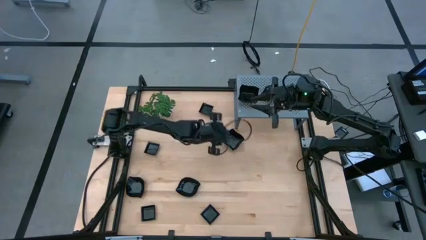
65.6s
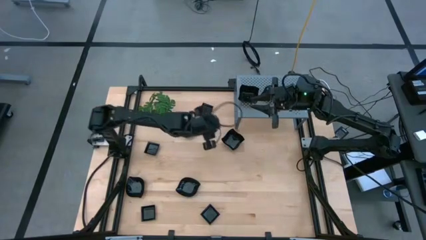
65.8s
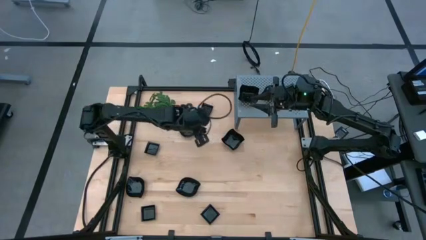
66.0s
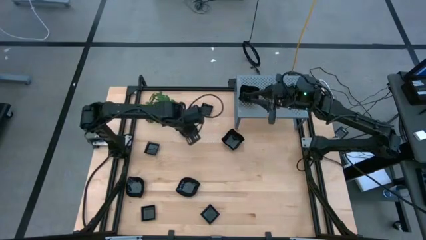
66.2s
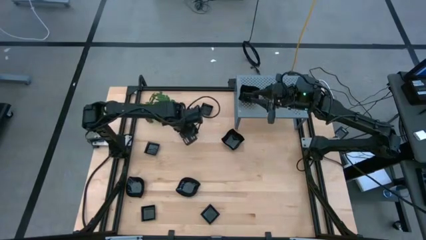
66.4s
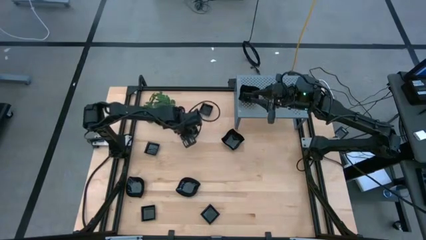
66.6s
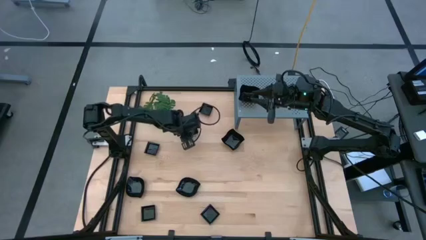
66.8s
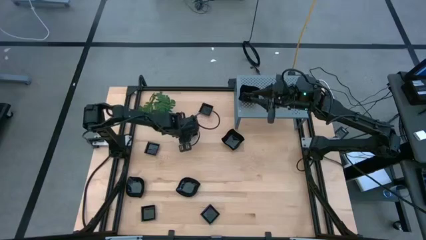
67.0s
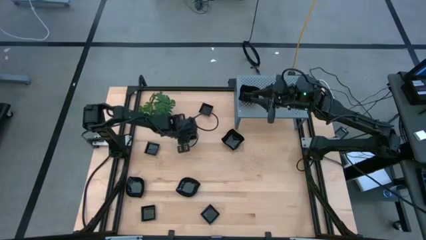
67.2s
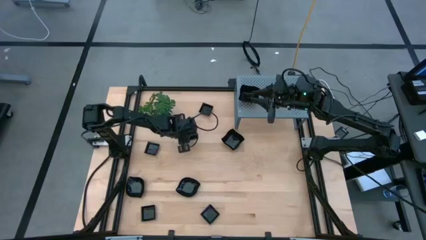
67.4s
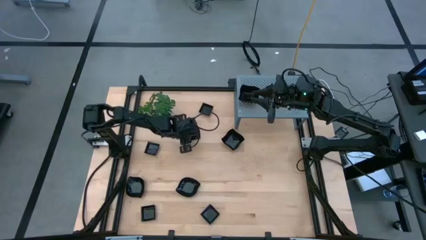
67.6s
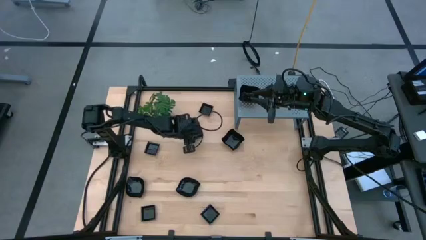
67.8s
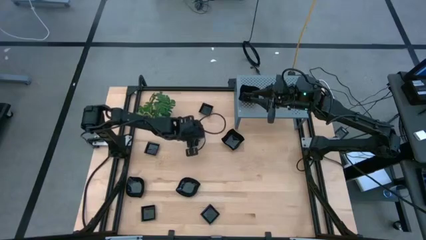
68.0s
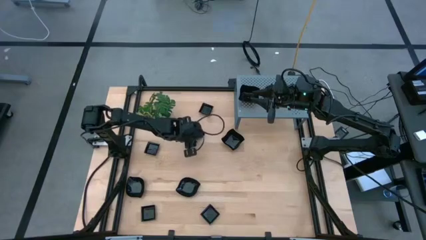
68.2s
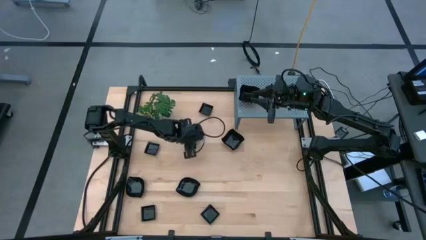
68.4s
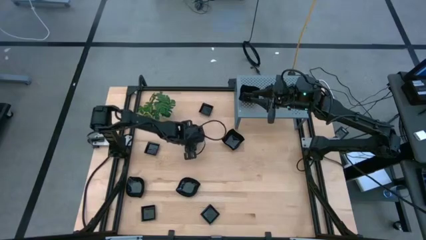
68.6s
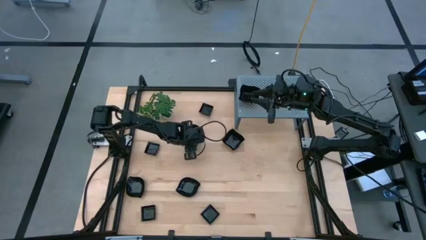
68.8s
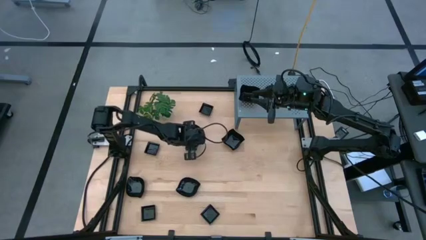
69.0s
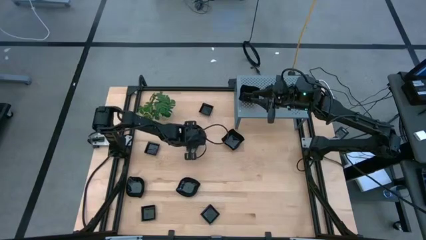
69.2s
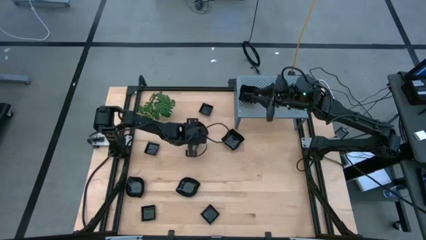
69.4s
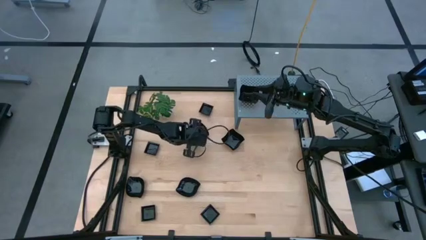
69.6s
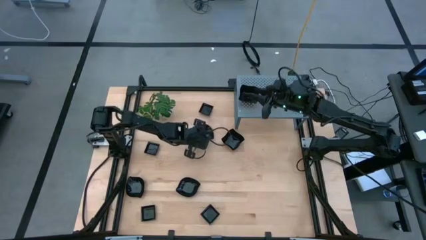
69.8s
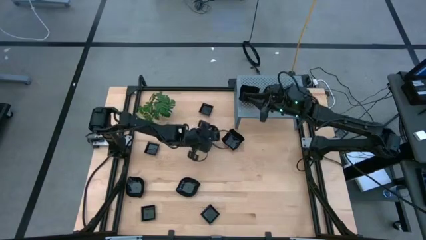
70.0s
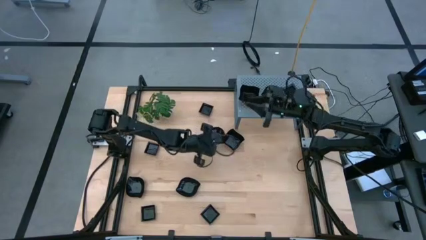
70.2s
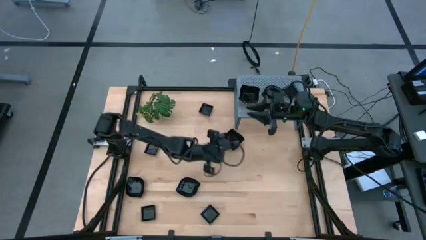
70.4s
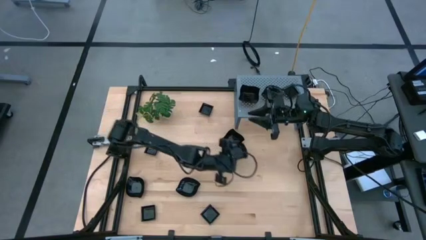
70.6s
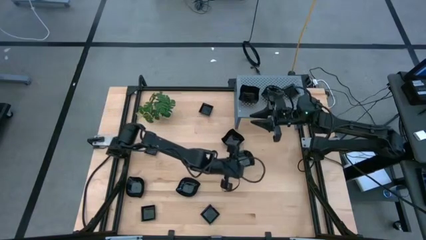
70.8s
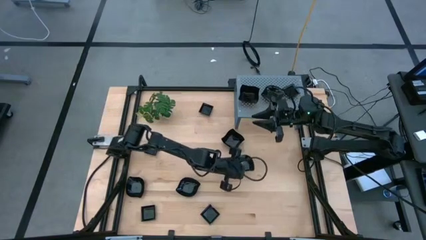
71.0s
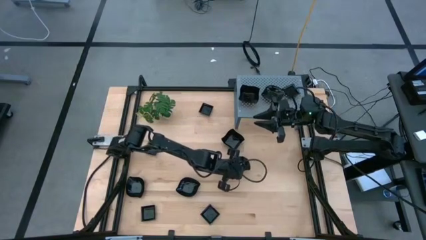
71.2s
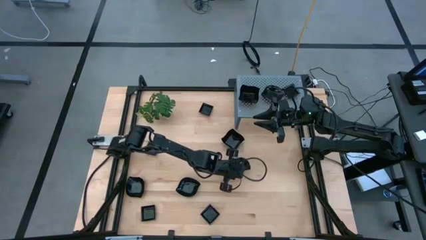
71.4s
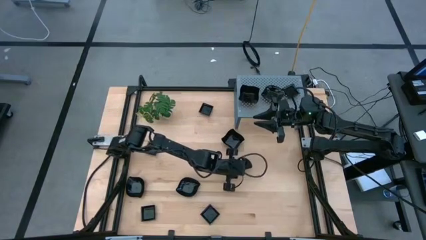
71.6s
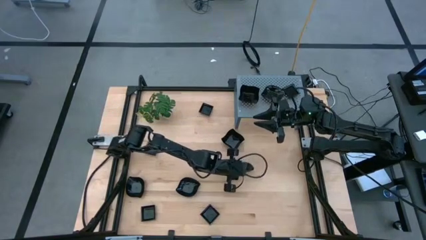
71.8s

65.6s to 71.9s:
Task: Pick & Place Mini shaped plates
Move the leaf shaped plate to the center of the table

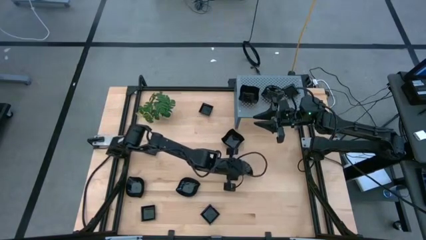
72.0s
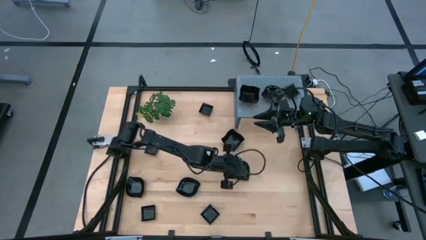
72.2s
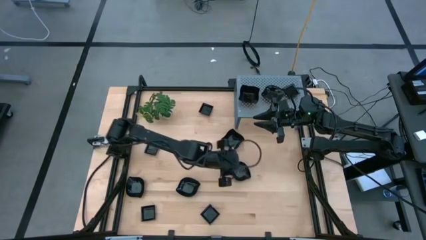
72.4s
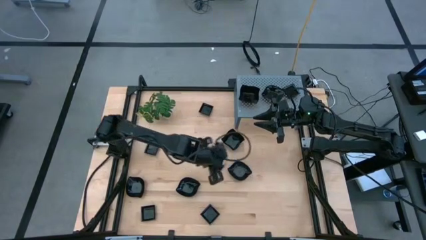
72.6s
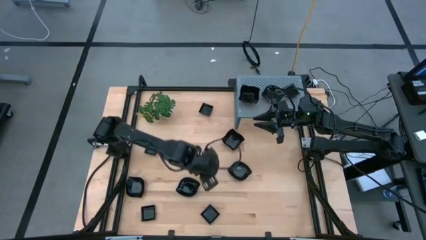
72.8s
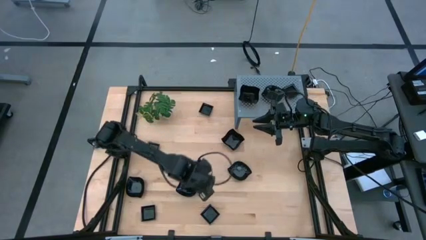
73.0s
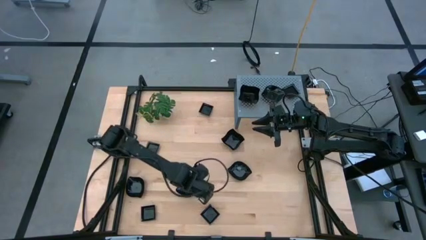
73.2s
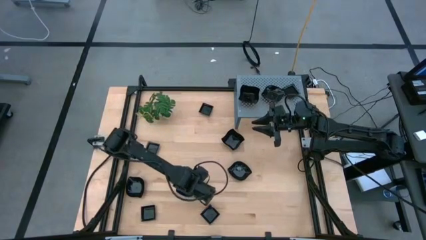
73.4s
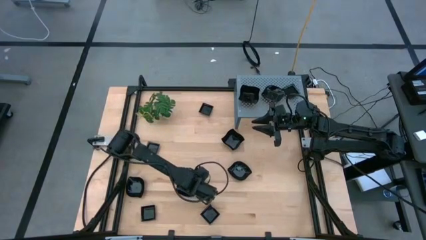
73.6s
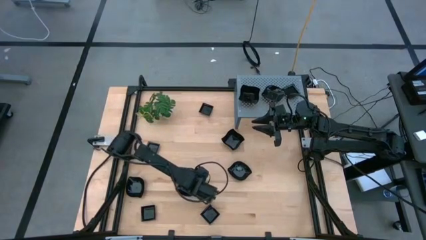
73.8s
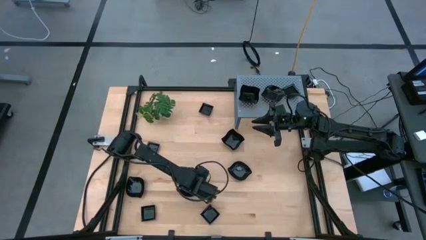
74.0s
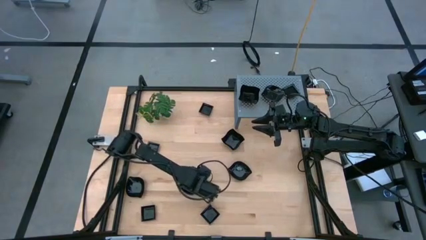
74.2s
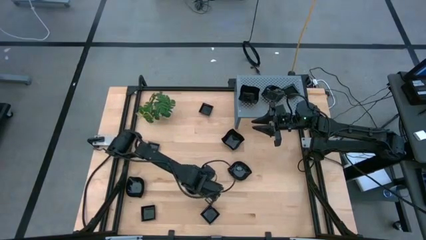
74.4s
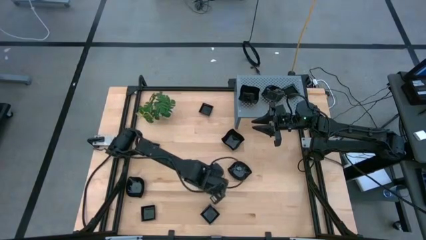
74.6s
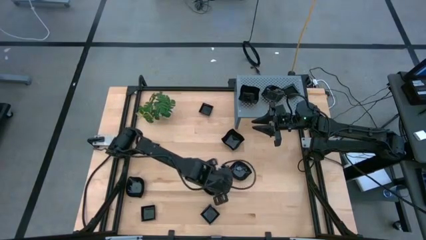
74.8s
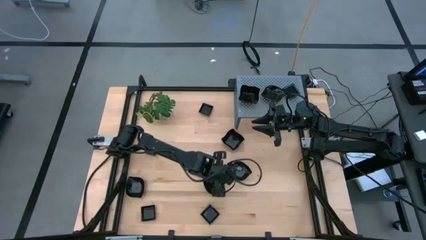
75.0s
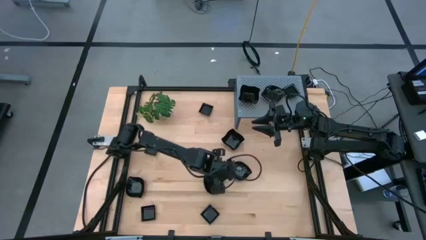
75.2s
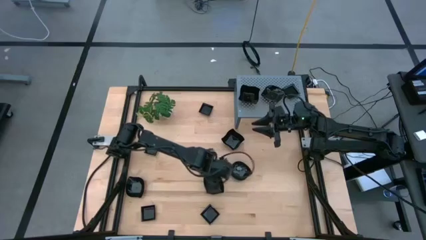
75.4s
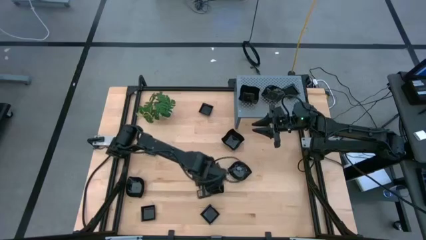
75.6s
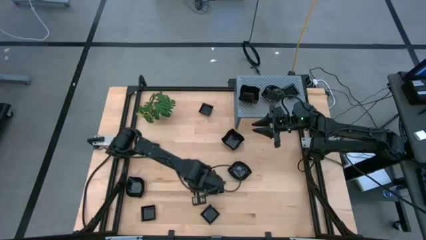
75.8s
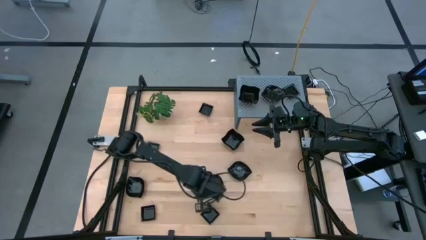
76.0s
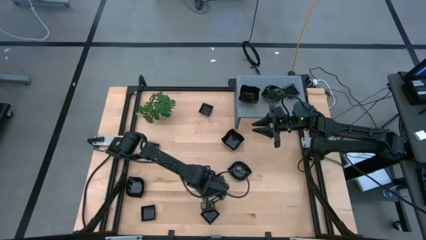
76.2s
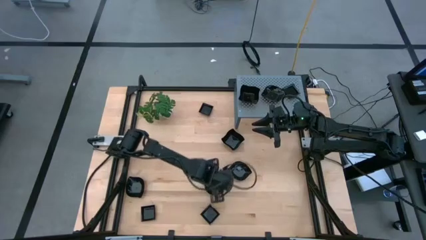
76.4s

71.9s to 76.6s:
Move the leaf shaped plate to center of the table

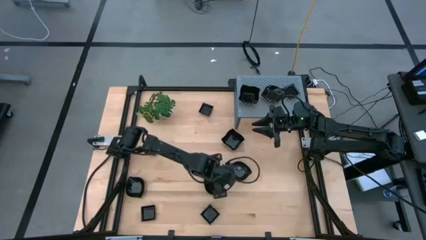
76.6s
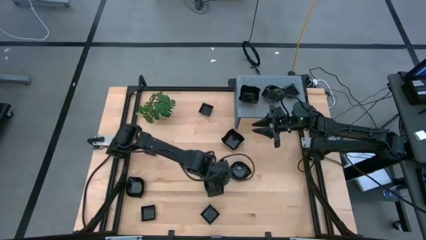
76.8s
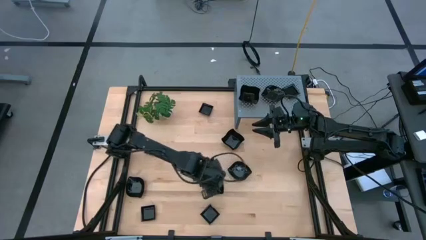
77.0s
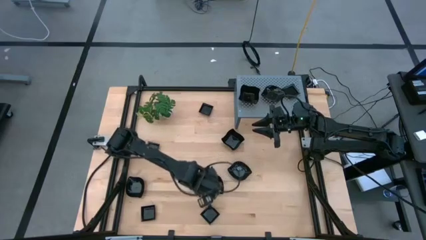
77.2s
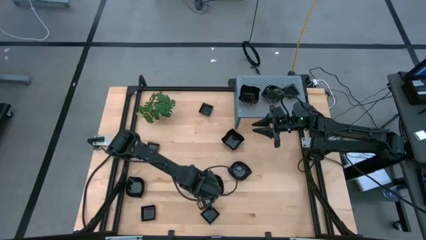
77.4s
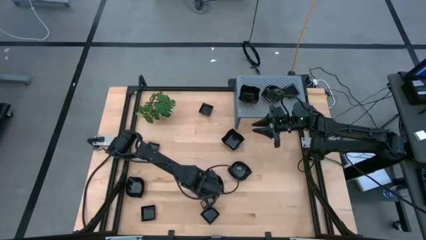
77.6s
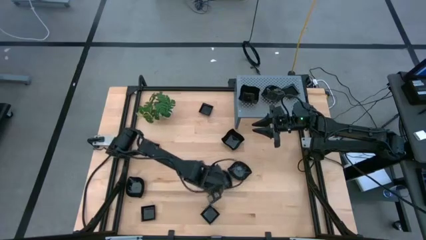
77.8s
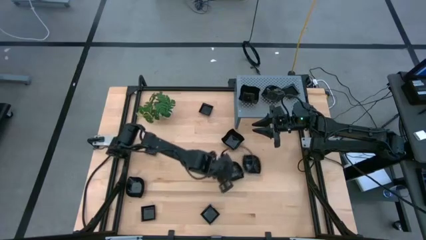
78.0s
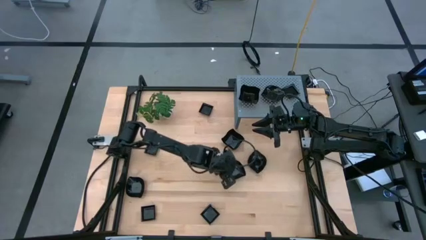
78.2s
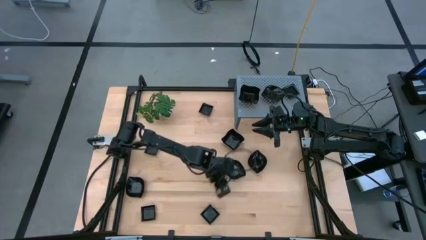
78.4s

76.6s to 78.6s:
Move the leaf shaped plate to center of the table

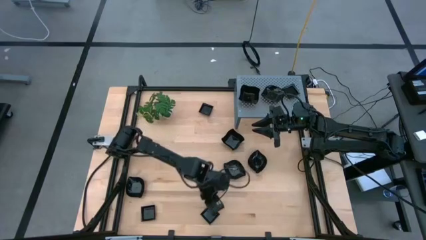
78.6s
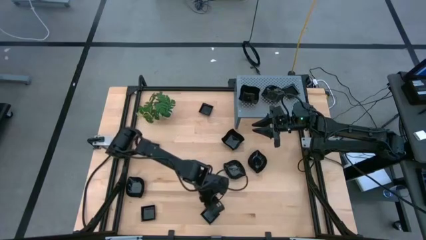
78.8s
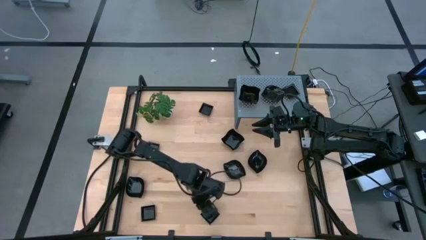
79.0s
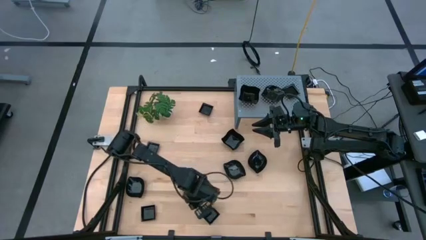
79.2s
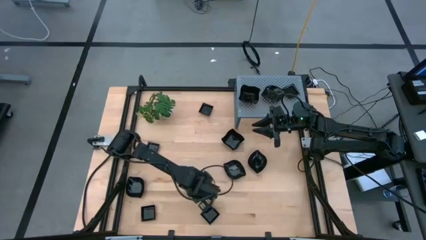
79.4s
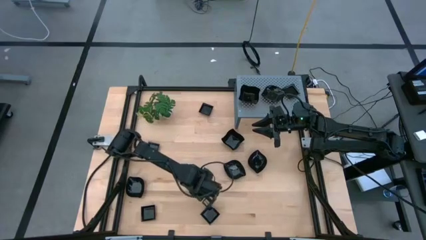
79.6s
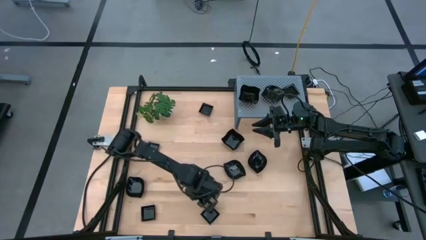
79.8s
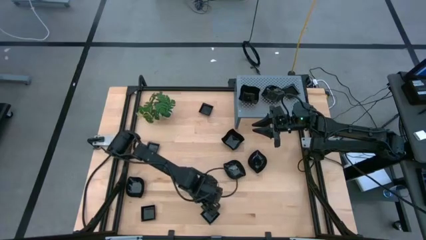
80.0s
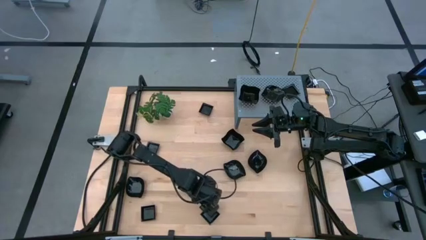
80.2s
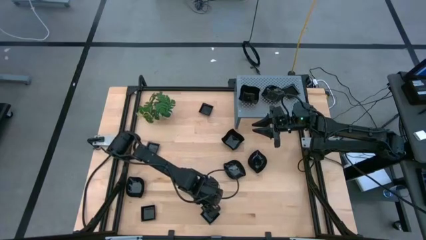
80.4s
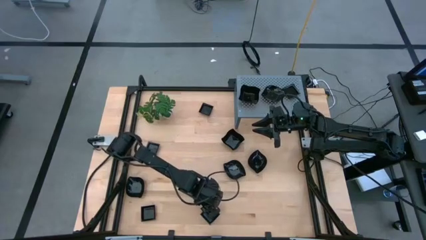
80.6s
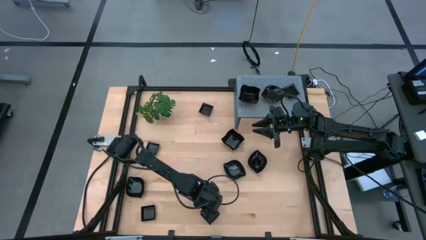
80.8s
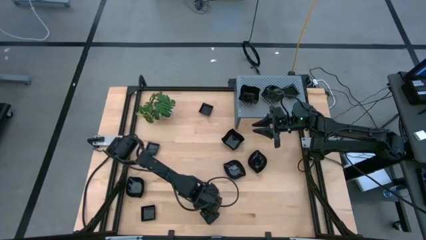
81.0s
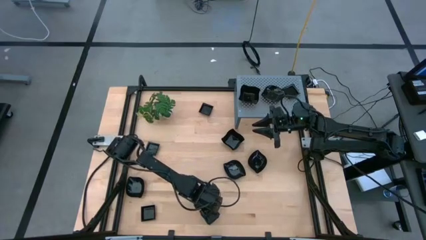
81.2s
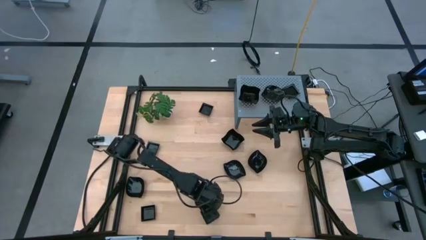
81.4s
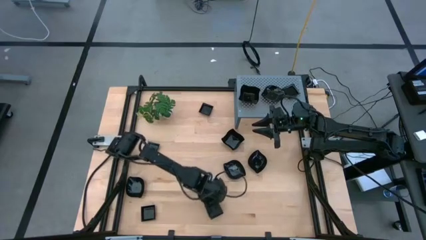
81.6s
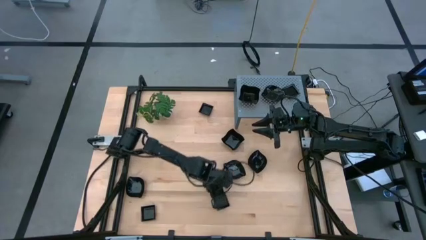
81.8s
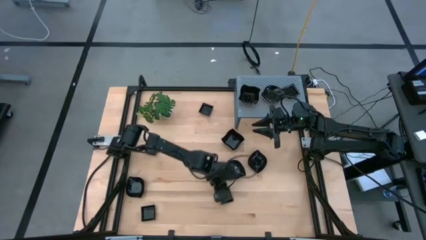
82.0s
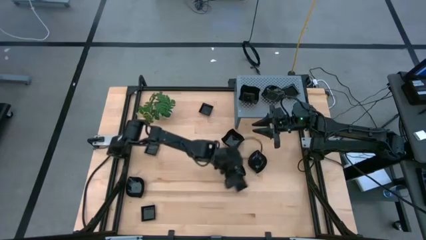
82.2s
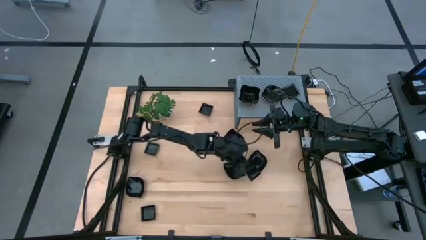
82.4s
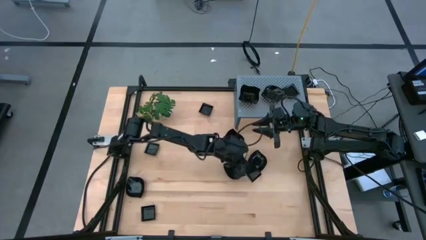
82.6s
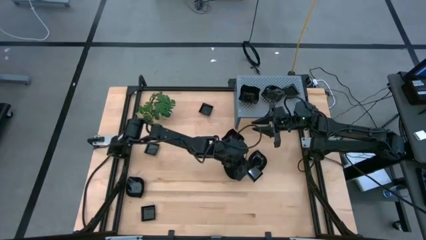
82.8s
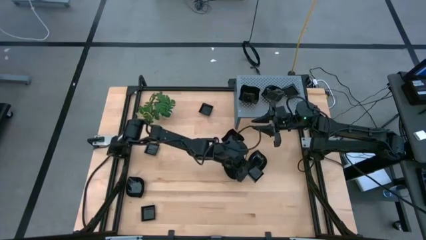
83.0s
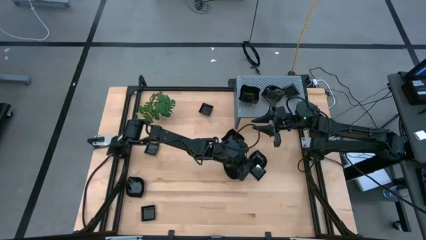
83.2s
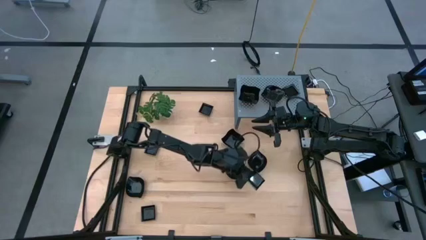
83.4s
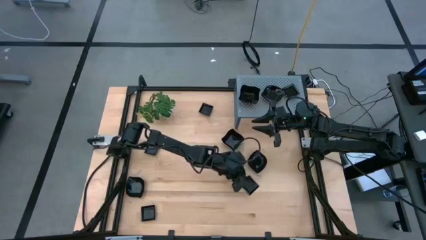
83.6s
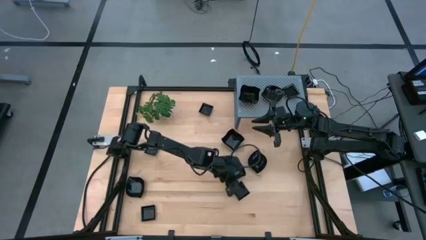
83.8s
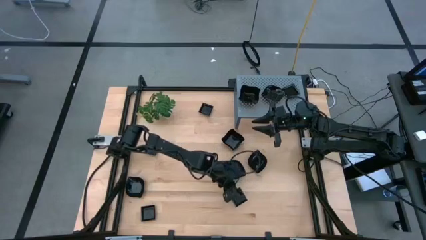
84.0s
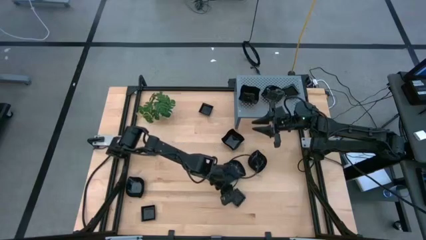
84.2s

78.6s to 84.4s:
Move the square plate to the center of the table
